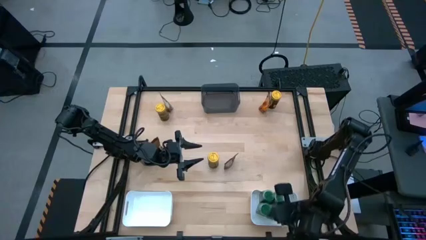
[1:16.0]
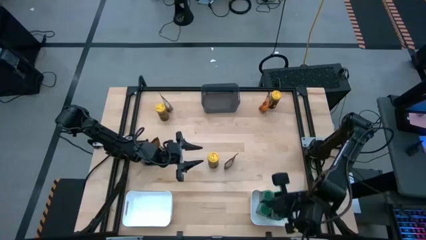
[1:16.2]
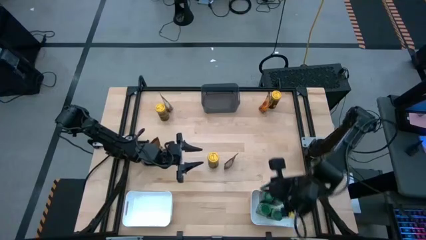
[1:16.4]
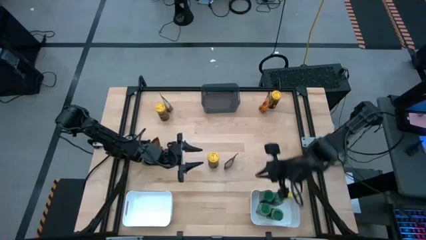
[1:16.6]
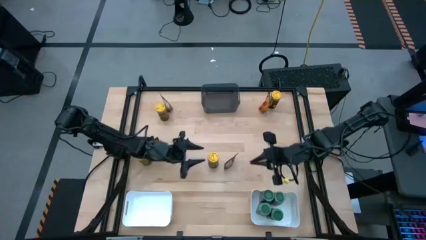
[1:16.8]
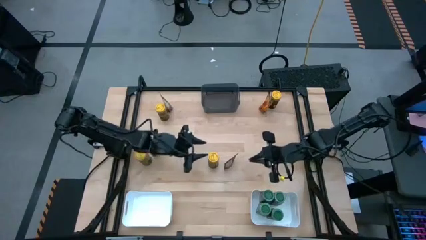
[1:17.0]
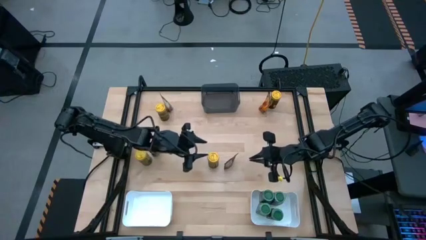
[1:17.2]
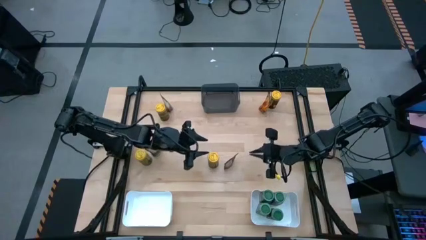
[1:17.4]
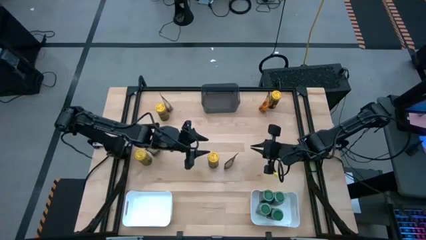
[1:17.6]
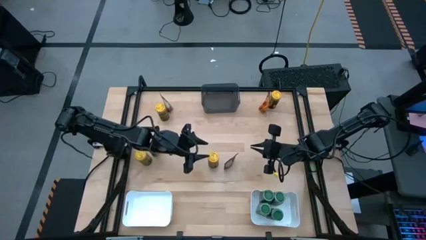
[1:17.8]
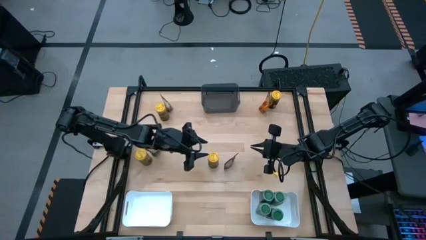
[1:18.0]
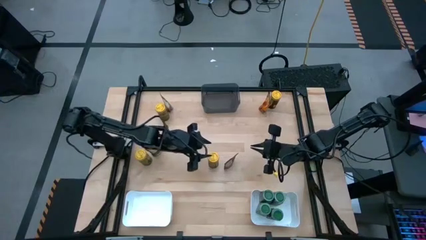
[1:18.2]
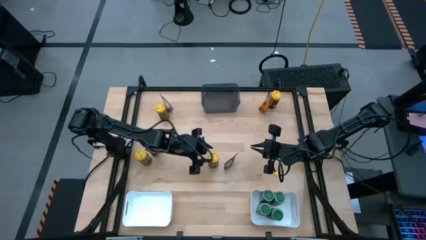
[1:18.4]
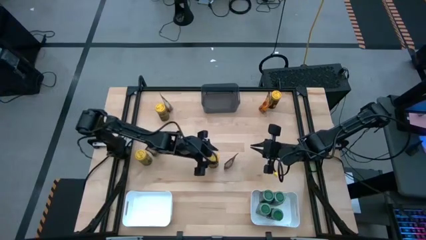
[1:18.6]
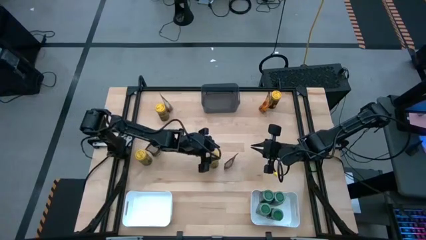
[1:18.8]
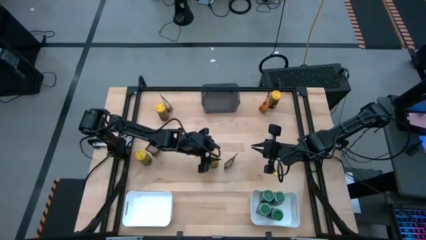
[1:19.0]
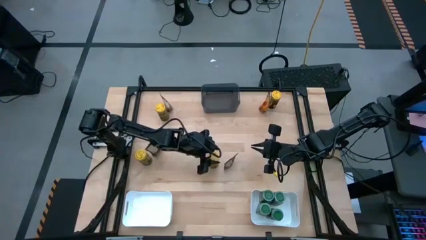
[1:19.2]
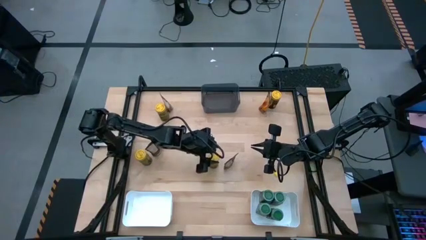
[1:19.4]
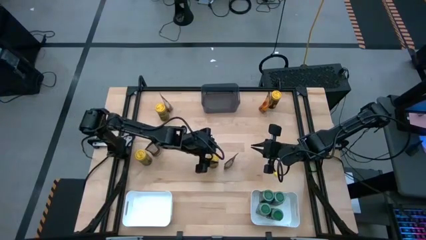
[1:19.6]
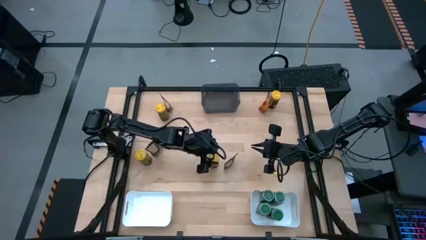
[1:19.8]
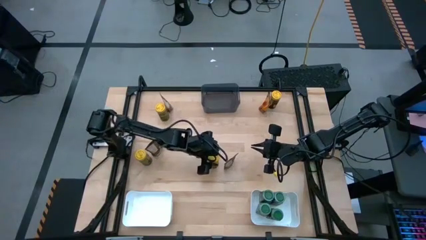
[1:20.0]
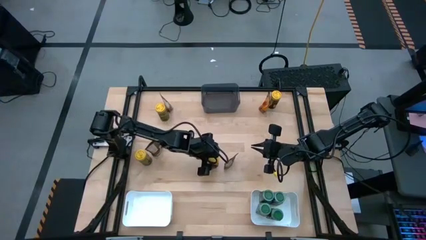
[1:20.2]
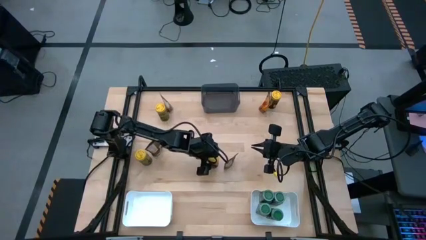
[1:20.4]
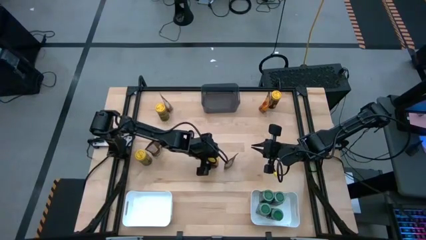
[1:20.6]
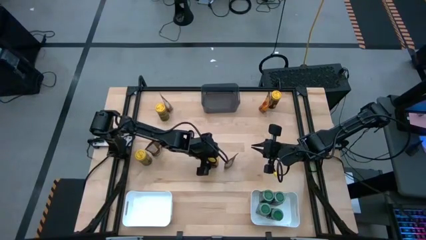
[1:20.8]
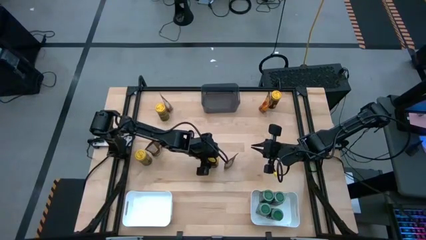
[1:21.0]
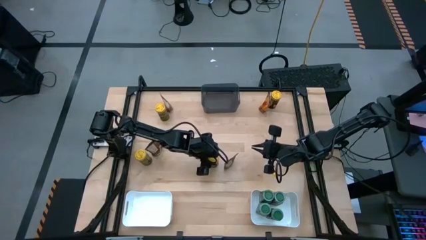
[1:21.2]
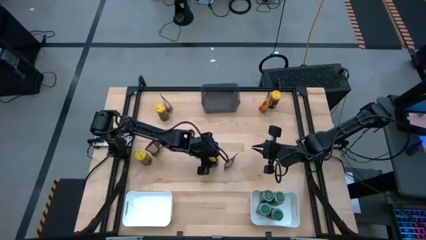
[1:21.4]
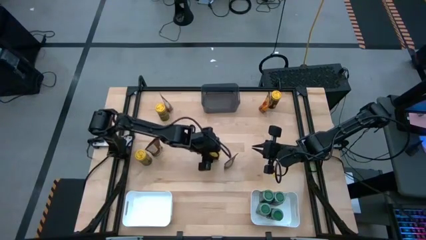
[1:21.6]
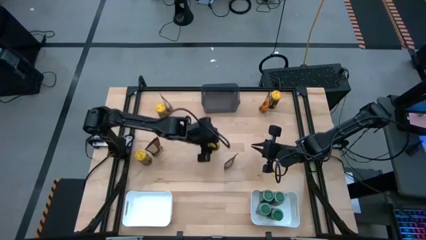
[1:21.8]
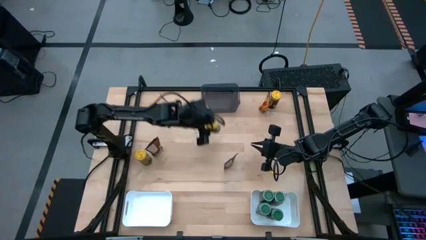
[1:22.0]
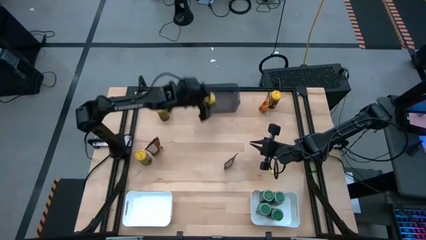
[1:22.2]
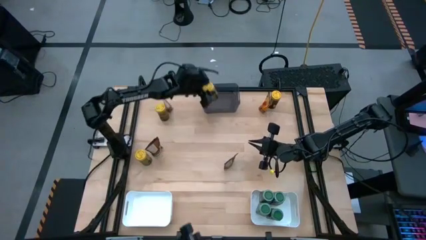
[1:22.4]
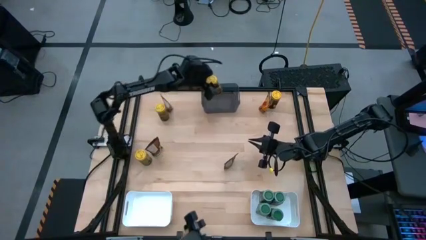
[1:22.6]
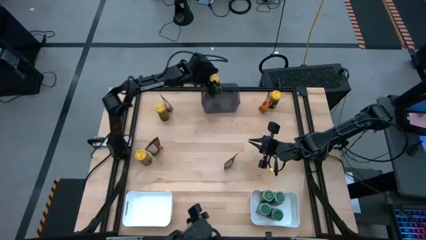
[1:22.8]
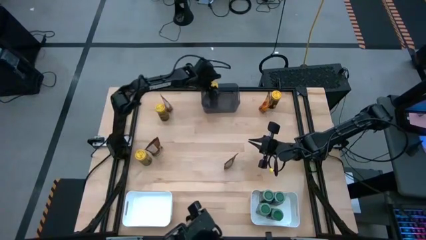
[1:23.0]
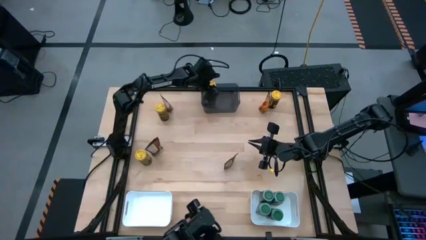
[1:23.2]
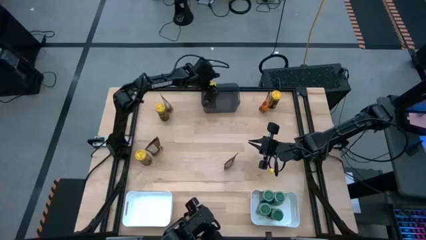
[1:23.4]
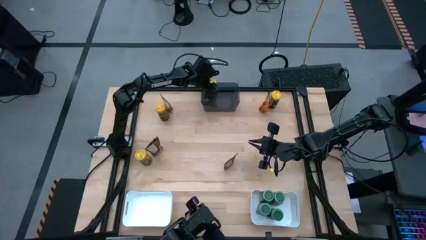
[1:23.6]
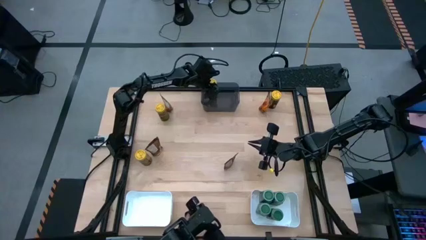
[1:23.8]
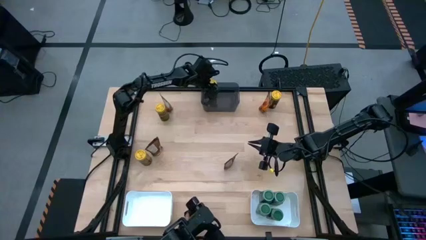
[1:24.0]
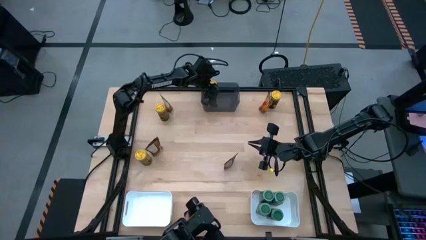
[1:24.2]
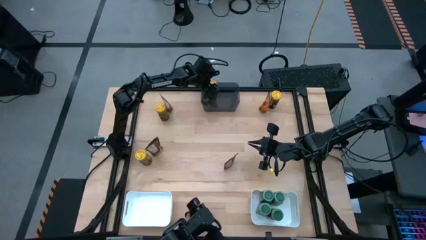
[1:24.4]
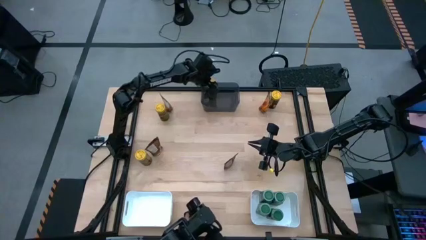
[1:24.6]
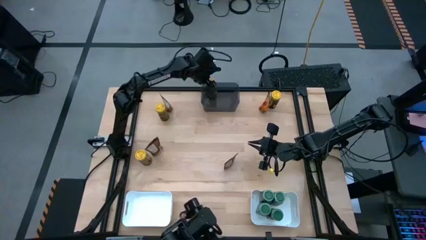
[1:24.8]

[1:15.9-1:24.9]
Task: Sort spices by type
Put the bottom right yellow seasoning bottle into the gray bin

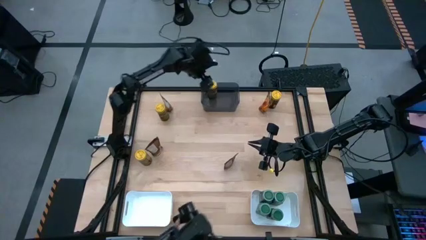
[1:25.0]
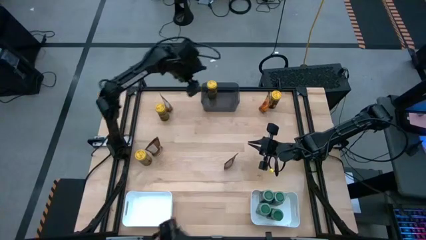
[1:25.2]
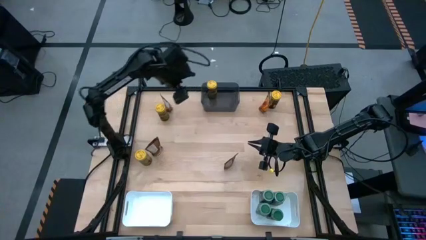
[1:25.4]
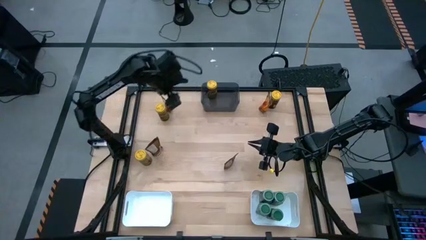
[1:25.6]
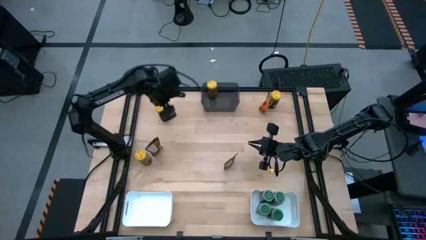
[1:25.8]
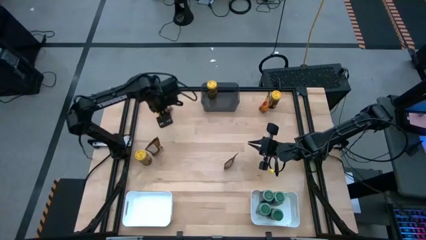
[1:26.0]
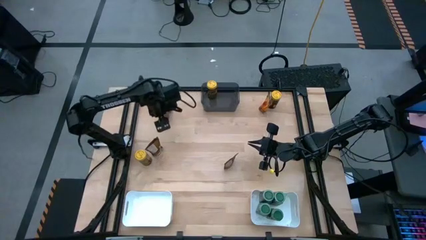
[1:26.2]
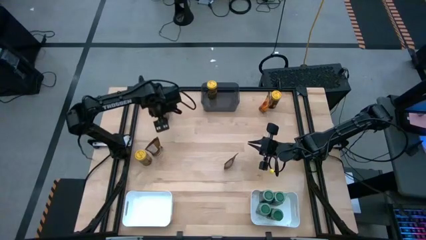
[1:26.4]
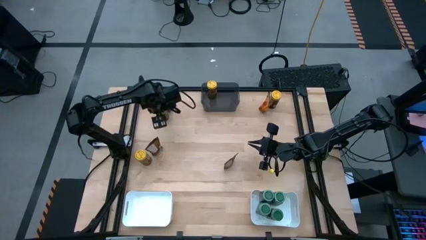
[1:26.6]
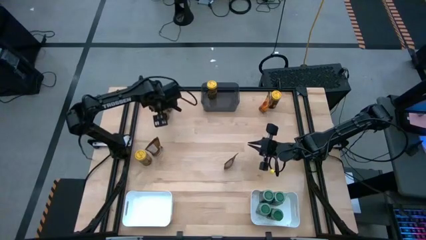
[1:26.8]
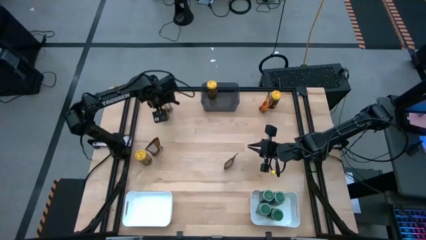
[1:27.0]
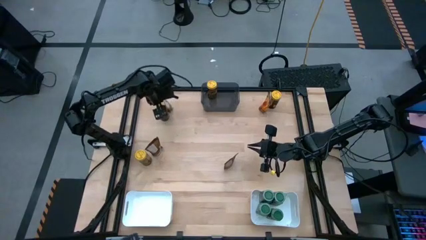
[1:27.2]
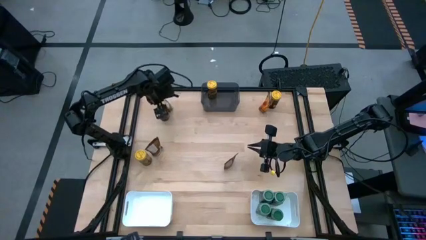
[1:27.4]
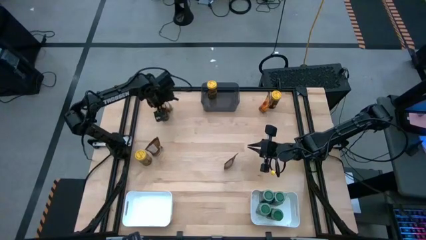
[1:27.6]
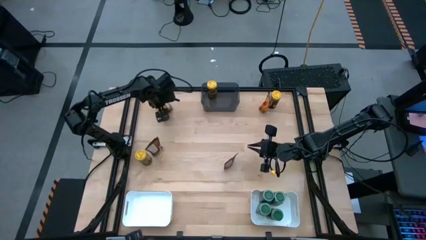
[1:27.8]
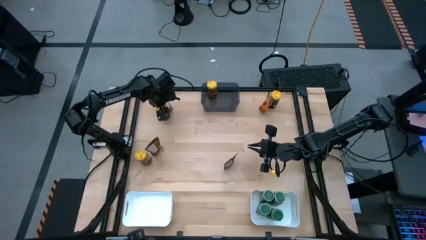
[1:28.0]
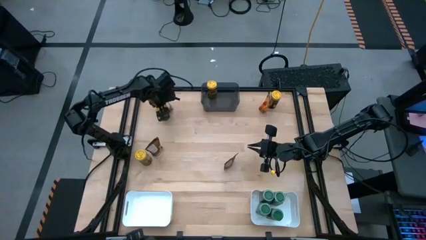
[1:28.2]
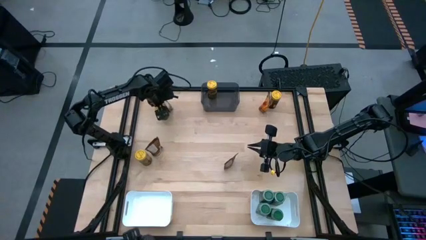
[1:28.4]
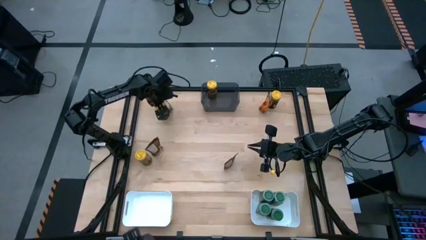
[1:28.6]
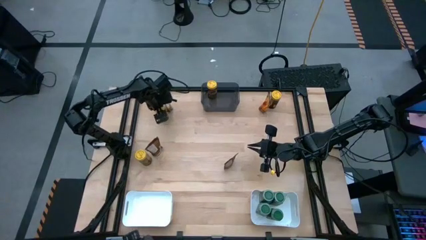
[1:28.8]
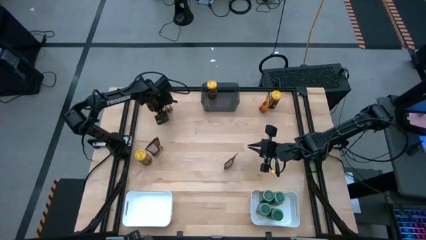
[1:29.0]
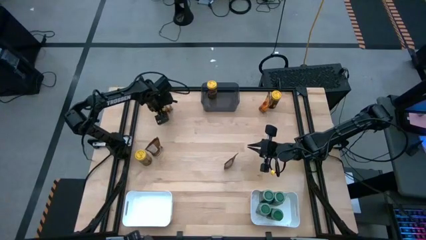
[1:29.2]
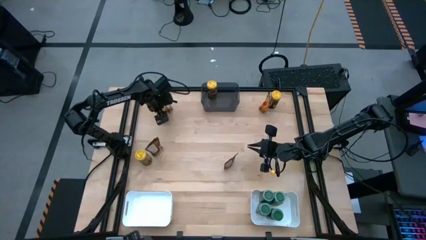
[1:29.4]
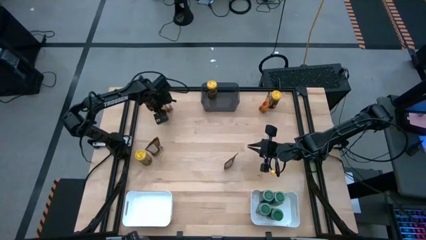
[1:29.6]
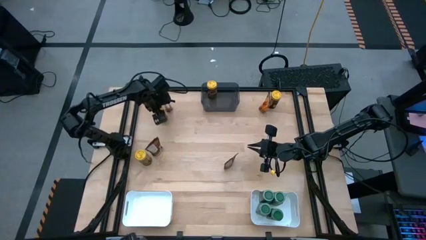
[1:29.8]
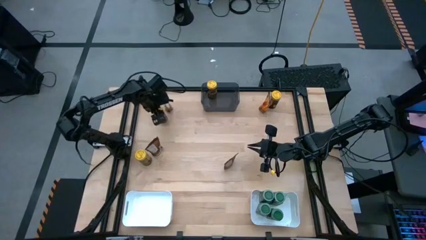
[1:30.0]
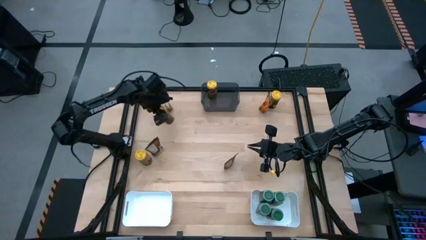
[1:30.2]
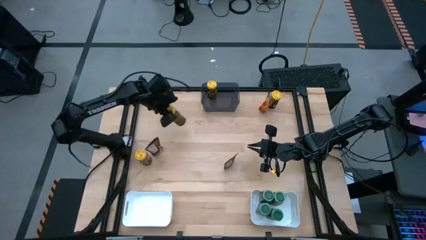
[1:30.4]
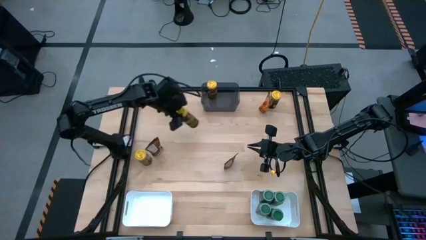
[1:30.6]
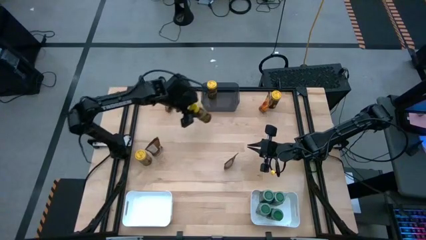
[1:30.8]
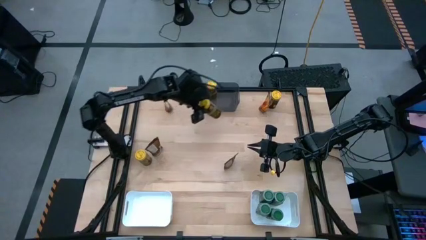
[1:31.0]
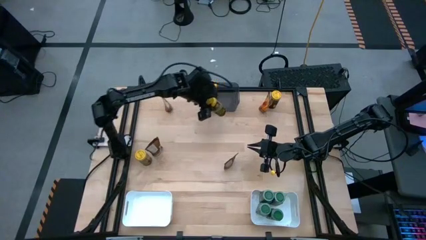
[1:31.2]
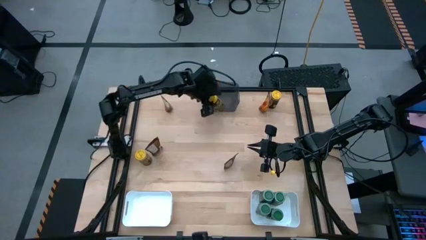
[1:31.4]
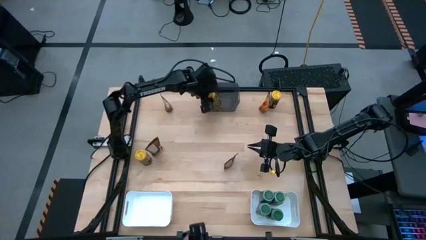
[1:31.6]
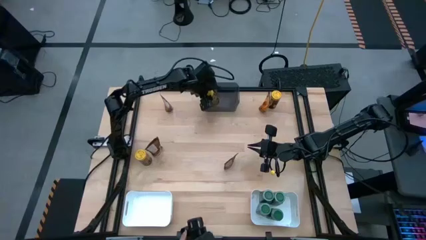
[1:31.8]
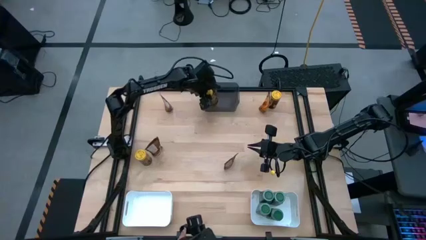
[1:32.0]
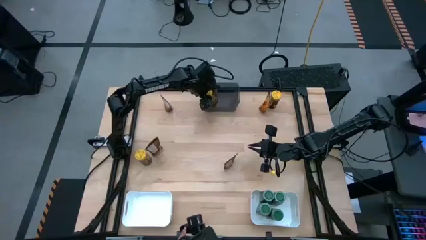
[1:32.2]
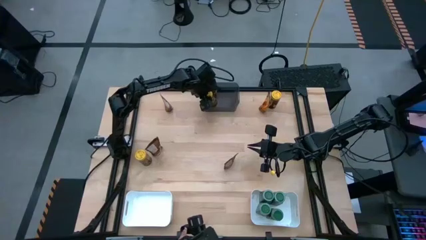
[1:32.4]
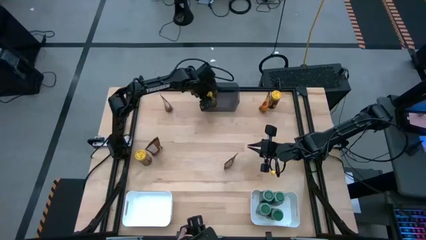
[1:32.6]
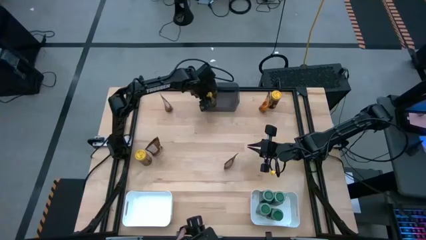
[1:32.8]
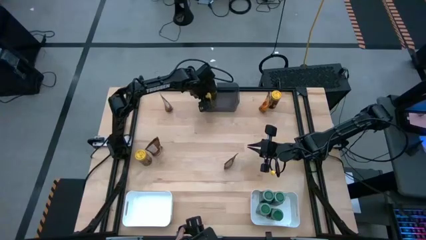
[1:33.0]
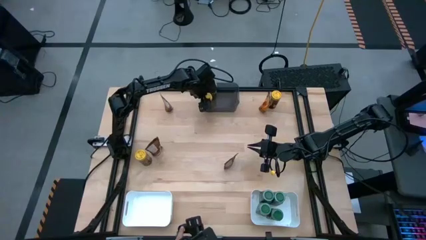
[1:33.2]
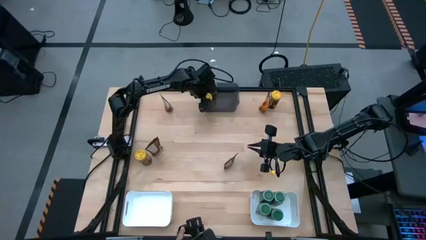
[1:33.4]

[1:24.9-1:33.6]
Put the top left yellow seasoning bottle into the gray bin
